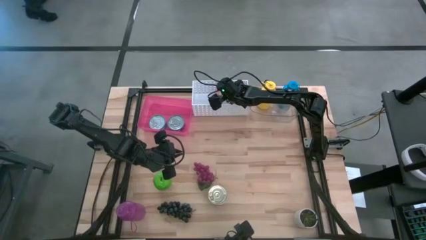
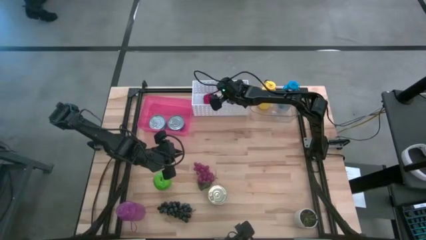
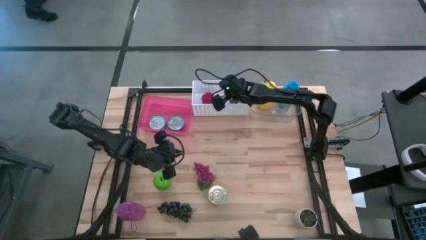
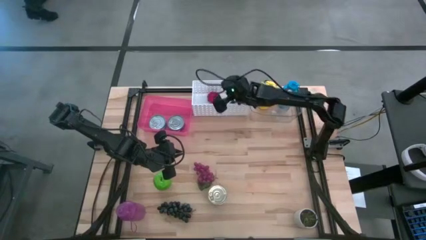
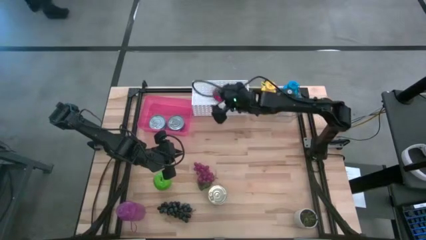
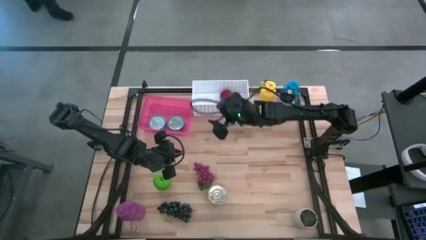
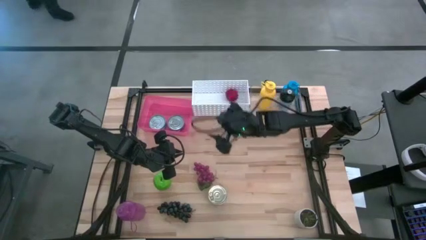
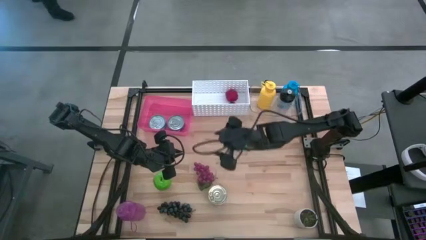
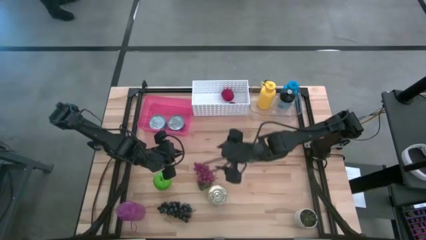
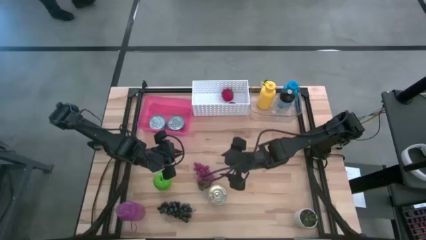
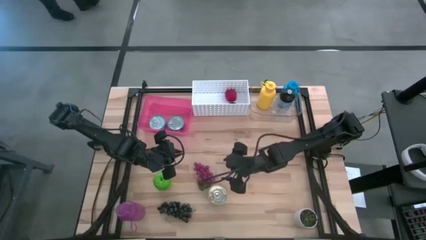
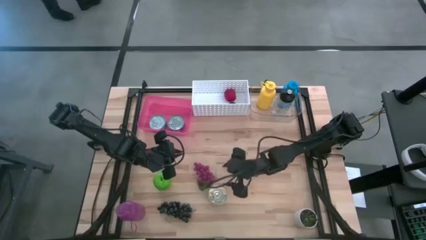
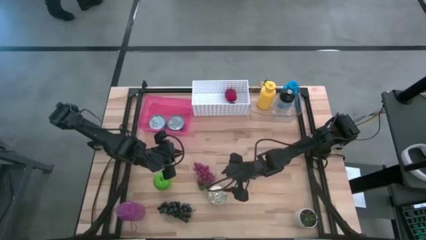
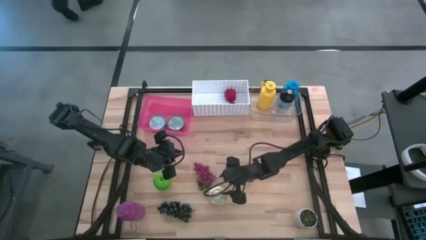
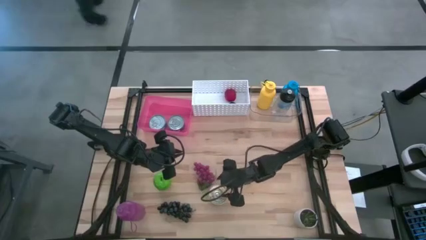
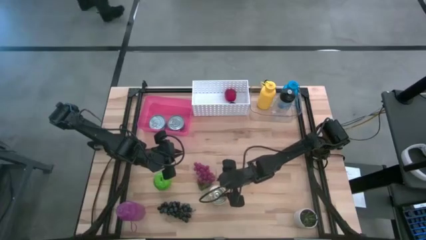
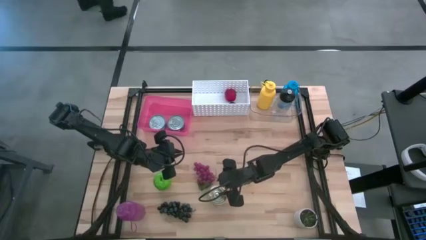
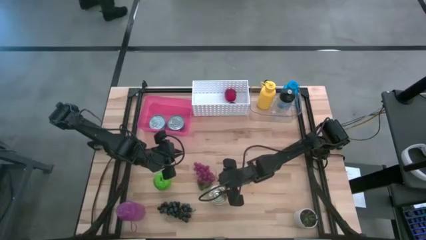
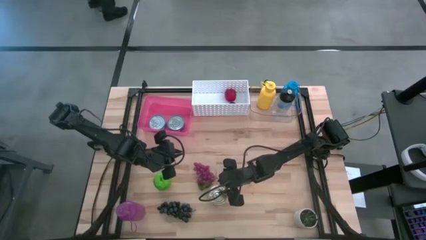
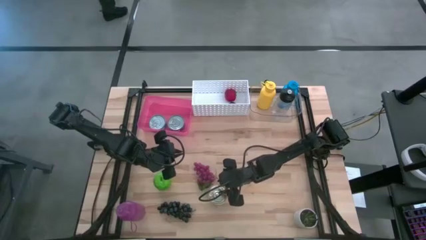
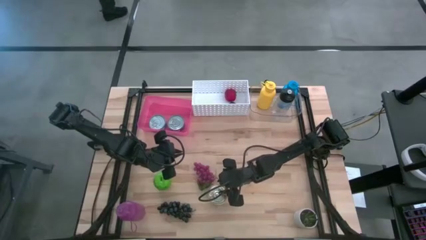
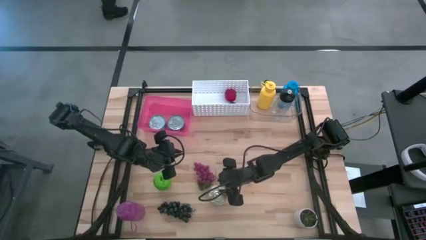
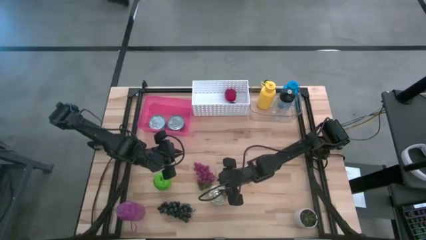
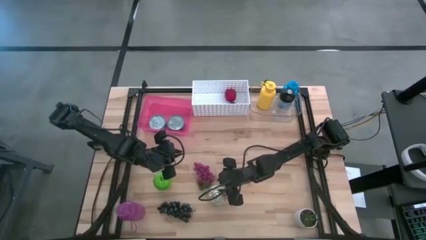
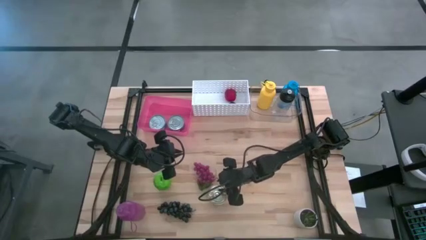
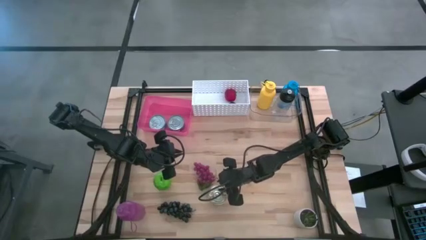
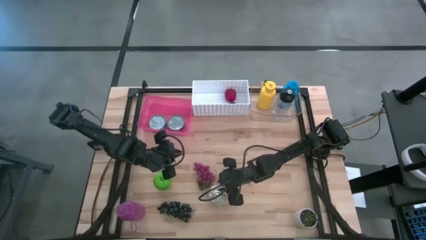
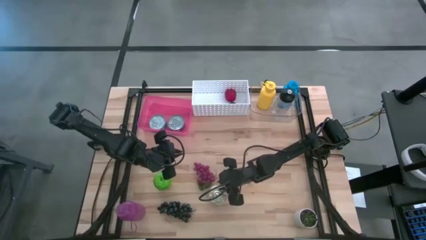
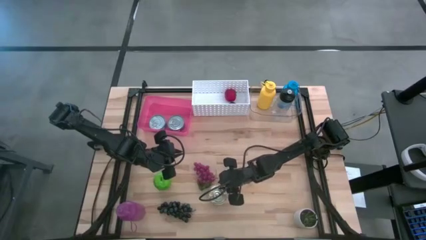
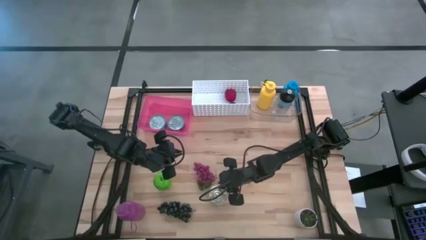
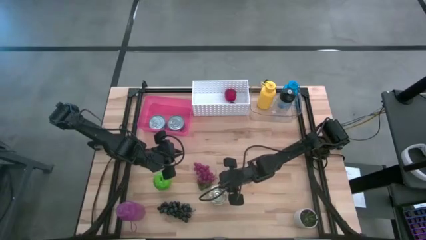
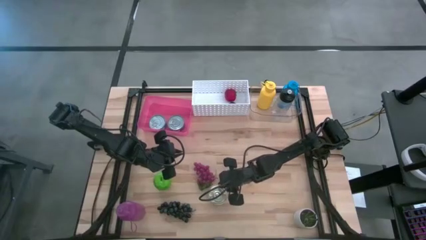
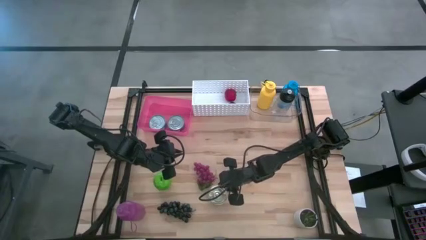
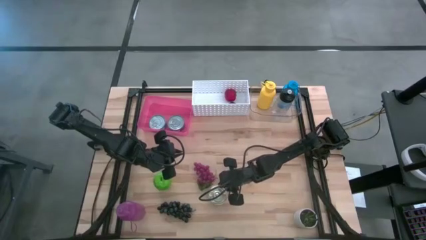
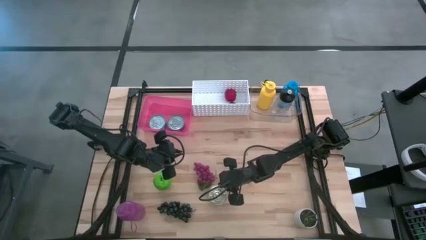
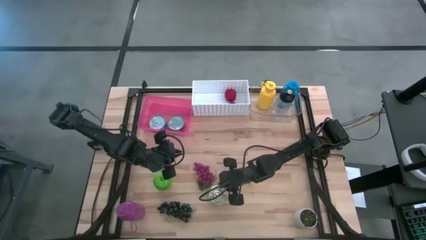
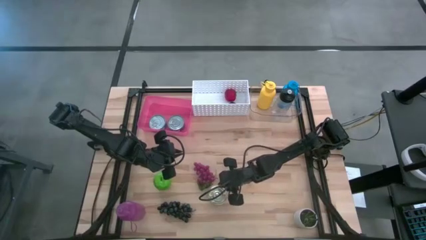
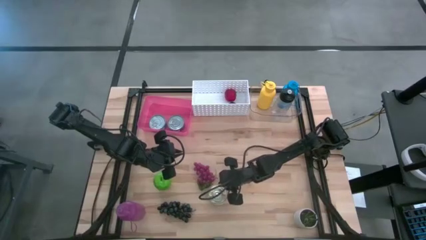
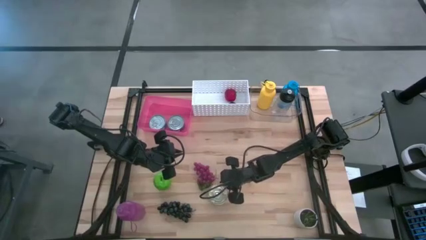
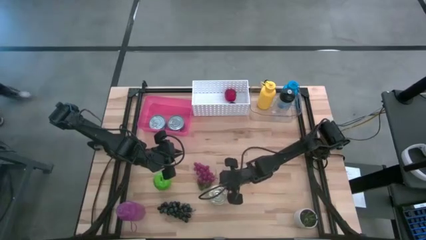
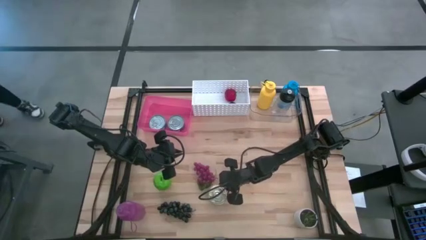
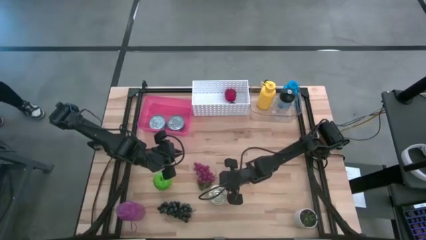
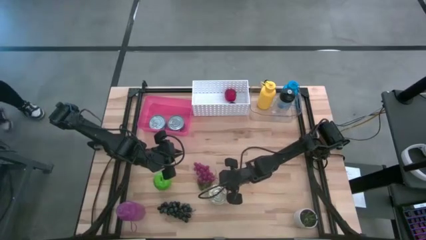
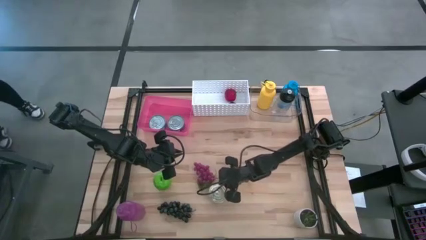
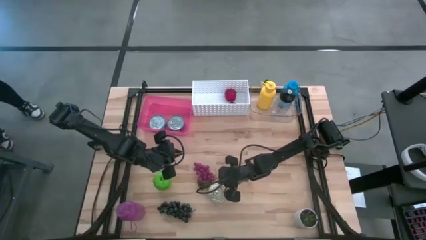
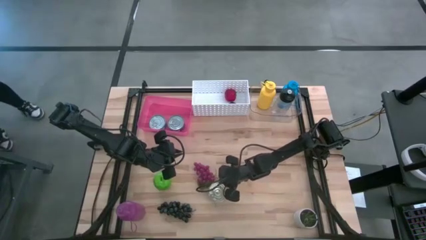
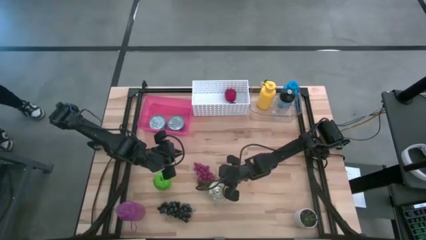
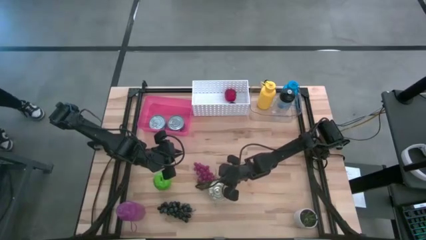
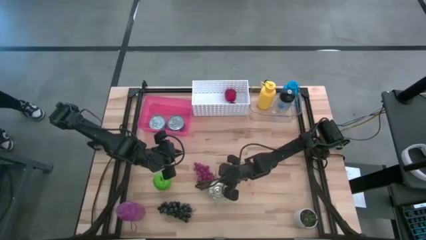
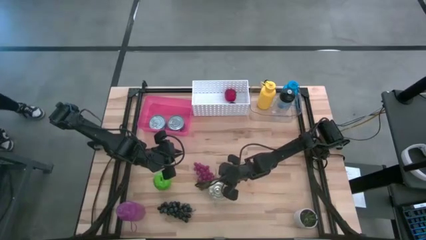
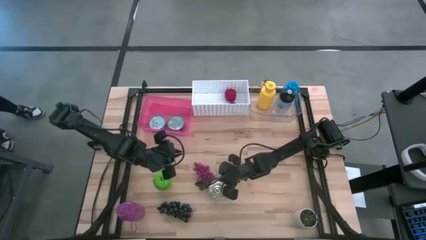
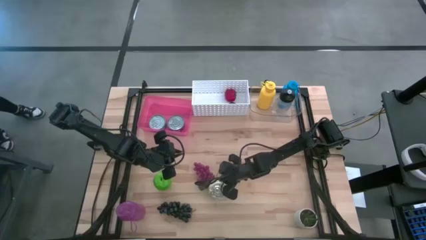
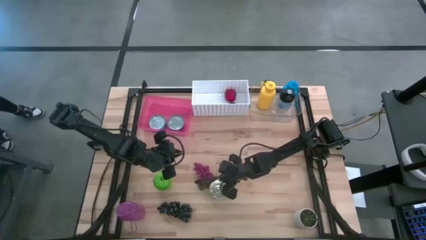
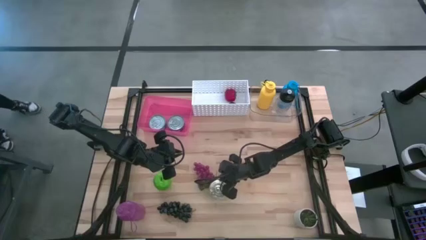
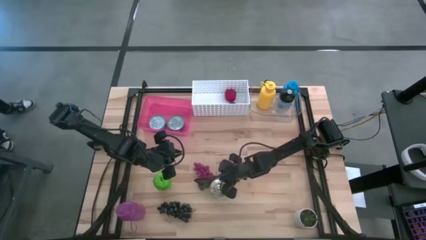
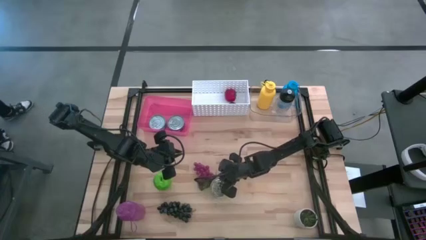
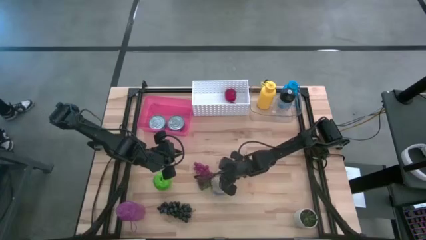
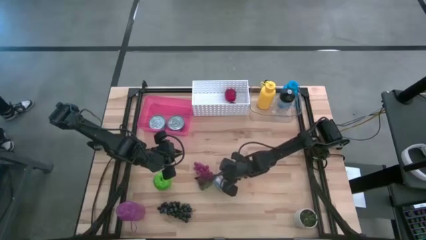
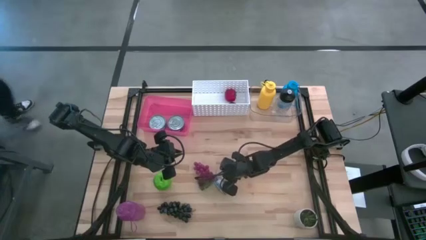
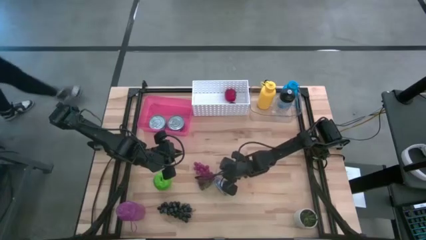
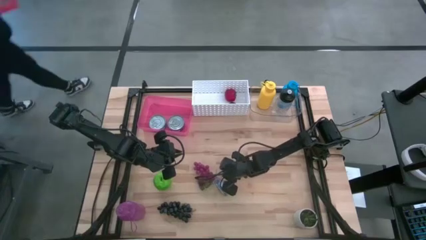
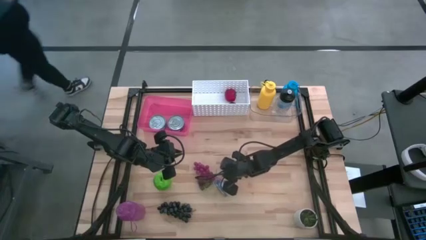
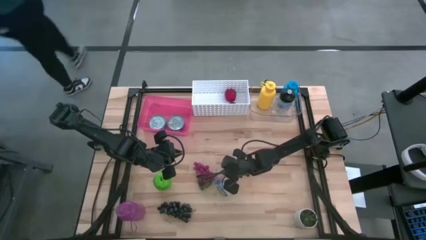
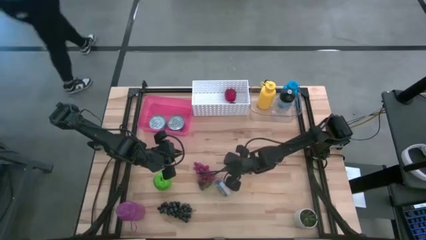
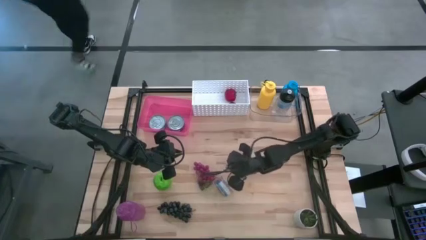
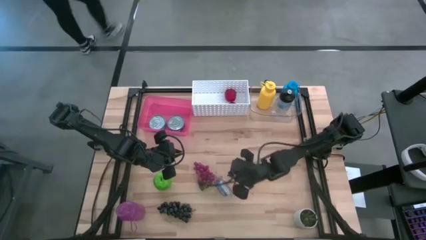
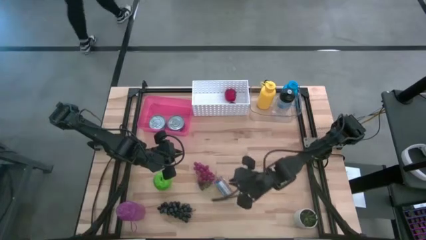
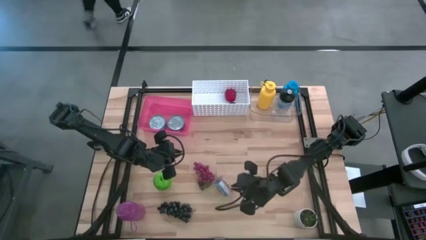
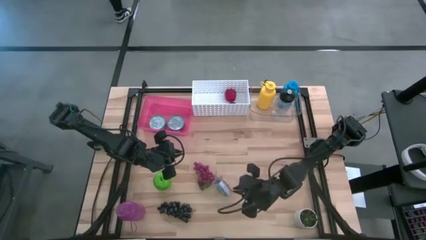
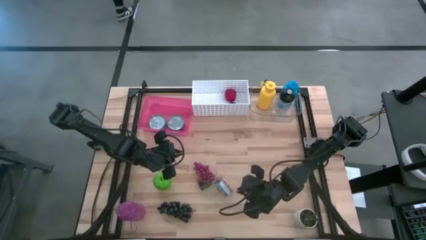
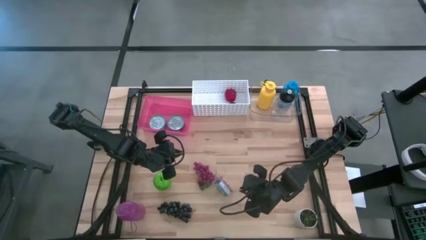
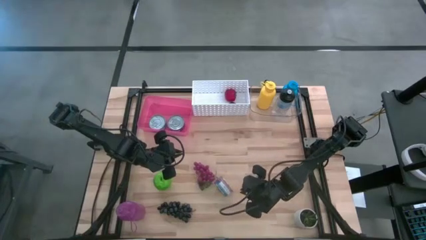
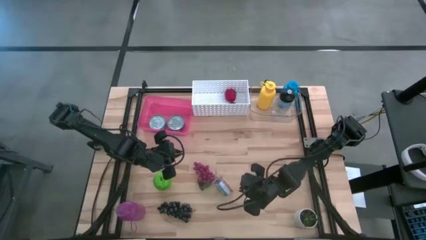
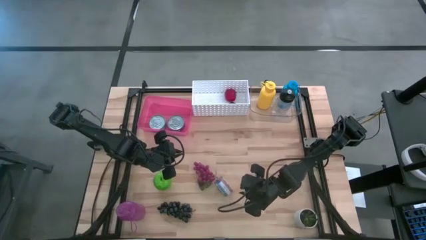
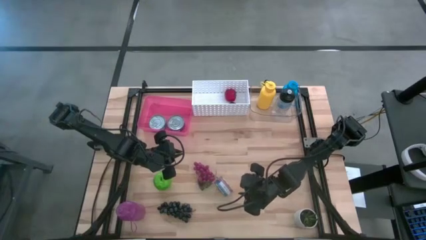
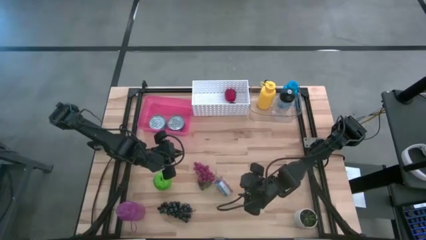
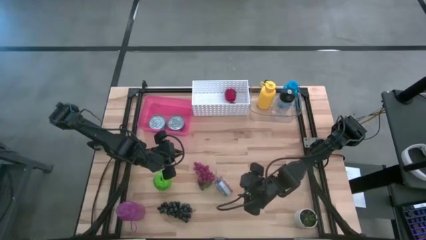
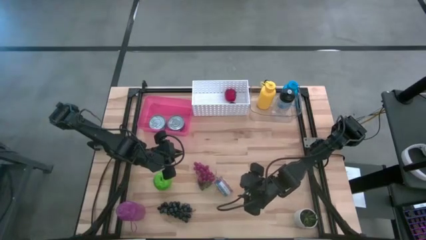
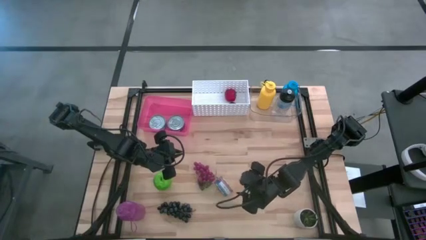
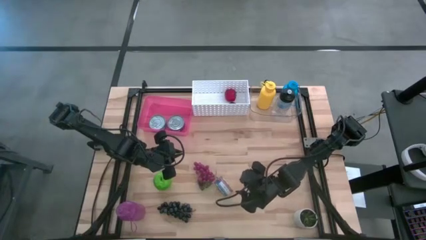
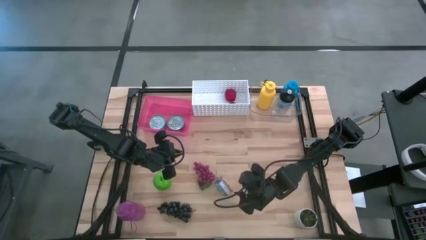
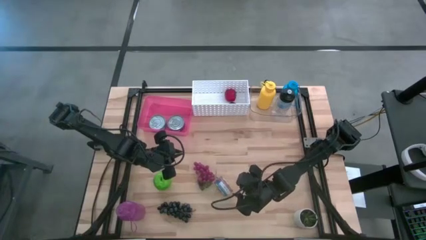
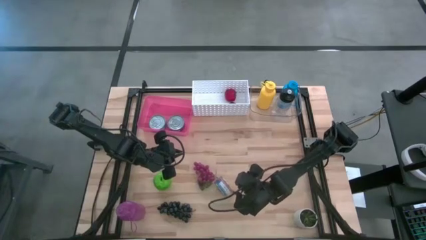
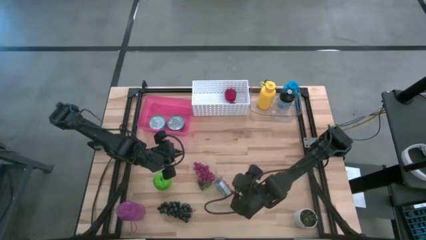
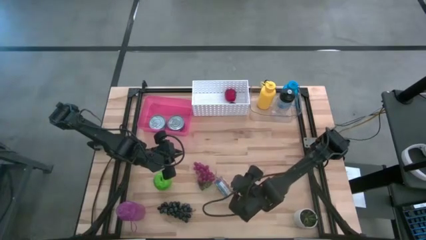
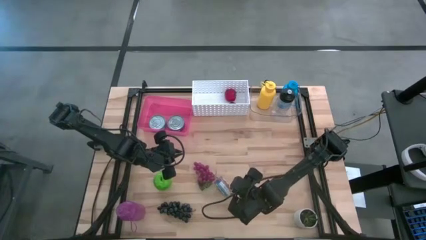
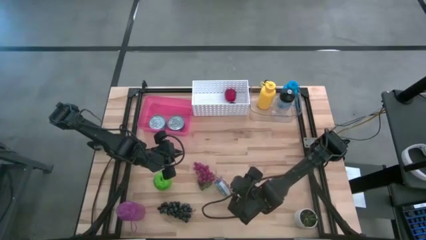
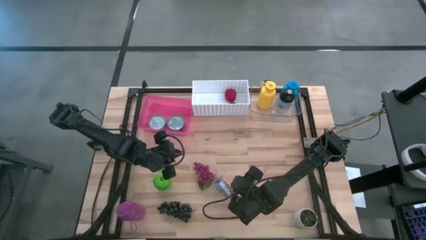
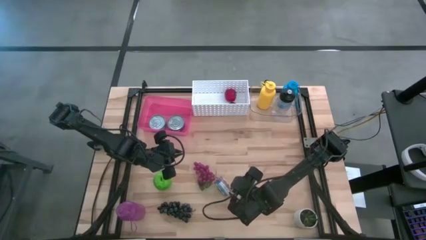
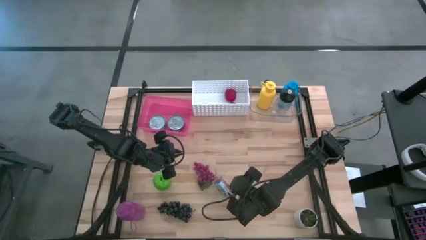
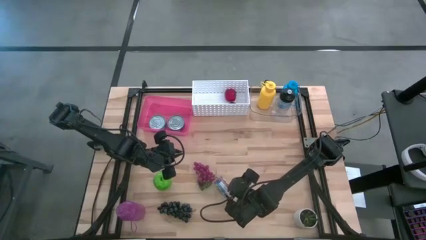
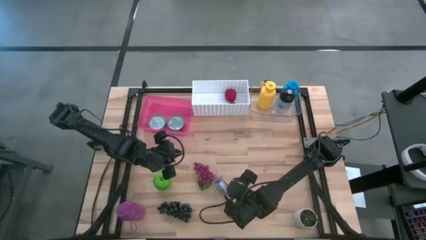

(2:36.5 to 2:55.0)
Task: Pick & Place Food Item
Put the blue pink tuna can into the pink bin
